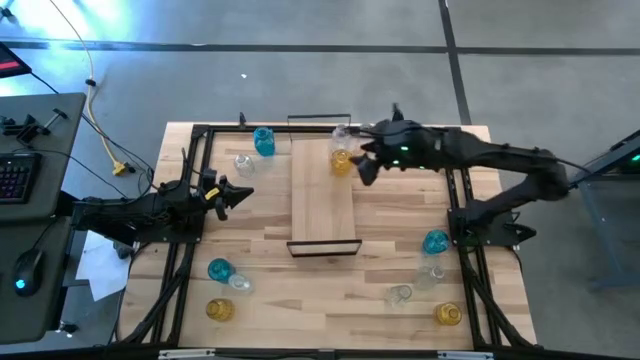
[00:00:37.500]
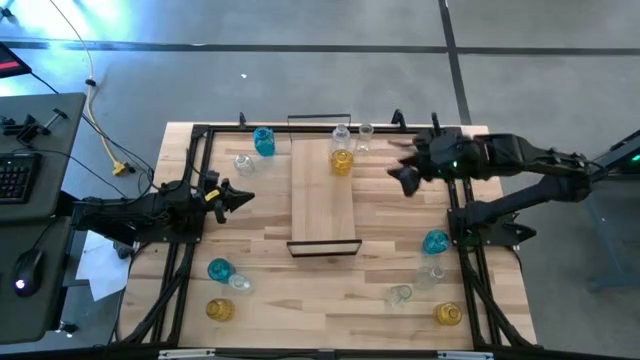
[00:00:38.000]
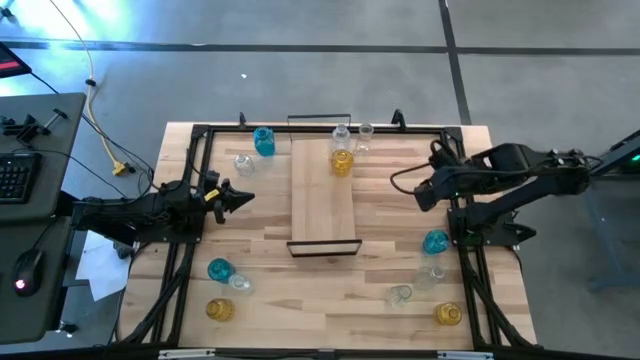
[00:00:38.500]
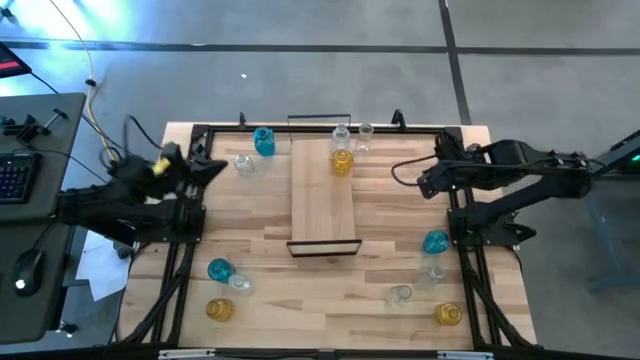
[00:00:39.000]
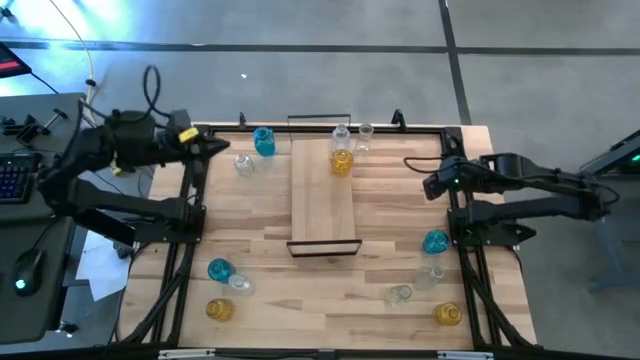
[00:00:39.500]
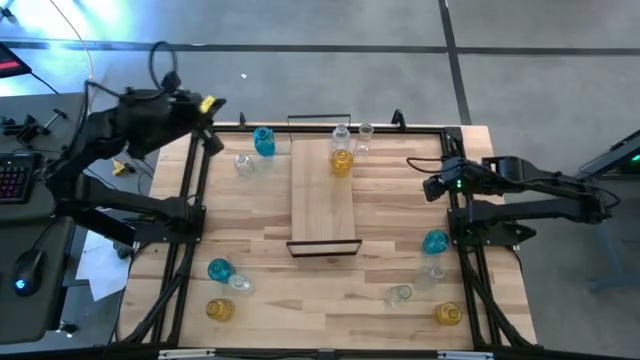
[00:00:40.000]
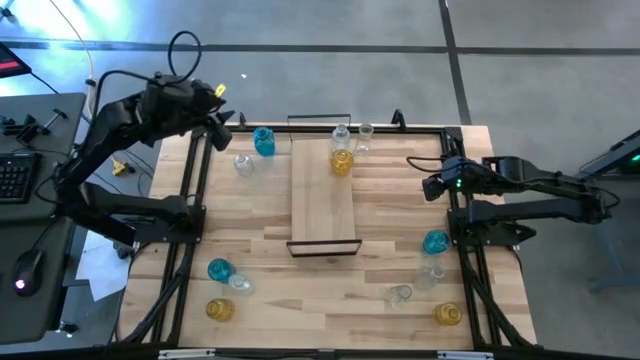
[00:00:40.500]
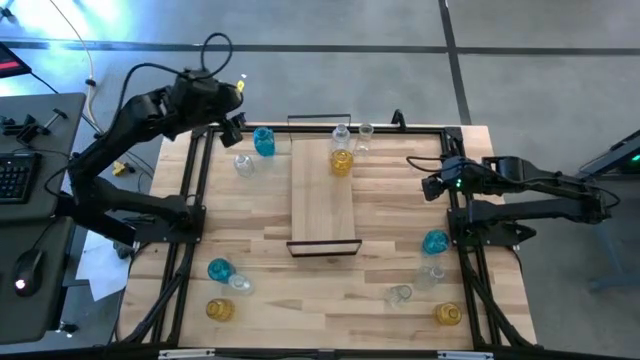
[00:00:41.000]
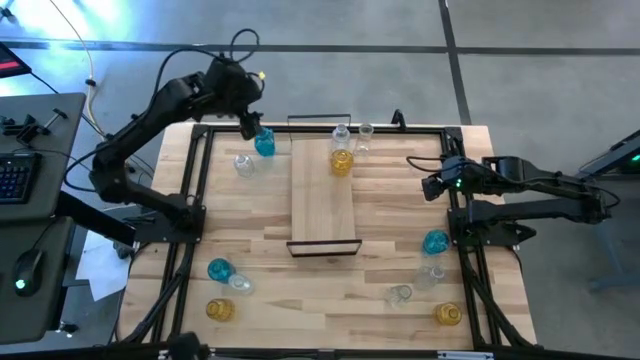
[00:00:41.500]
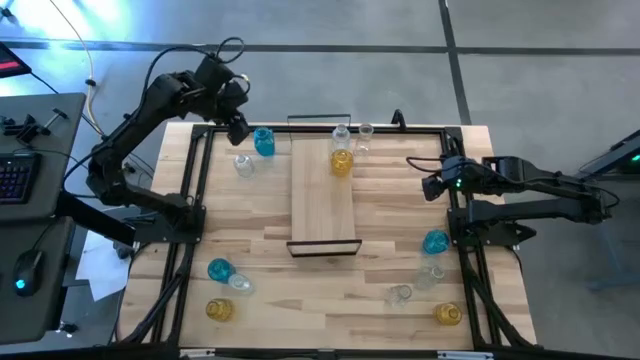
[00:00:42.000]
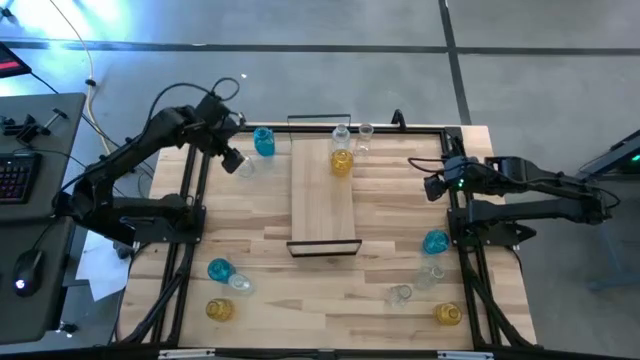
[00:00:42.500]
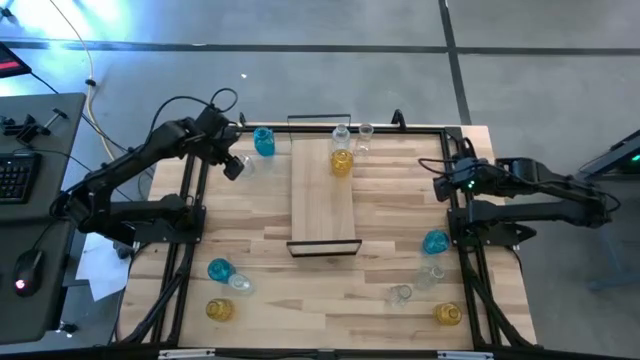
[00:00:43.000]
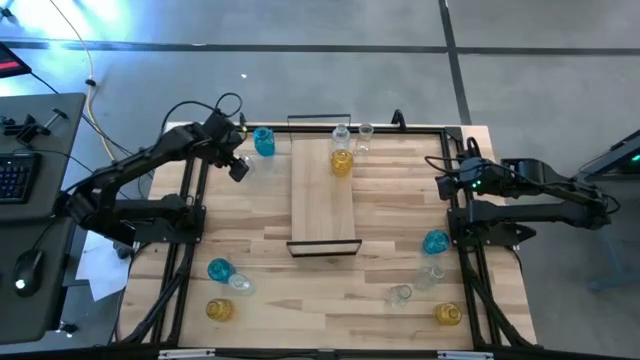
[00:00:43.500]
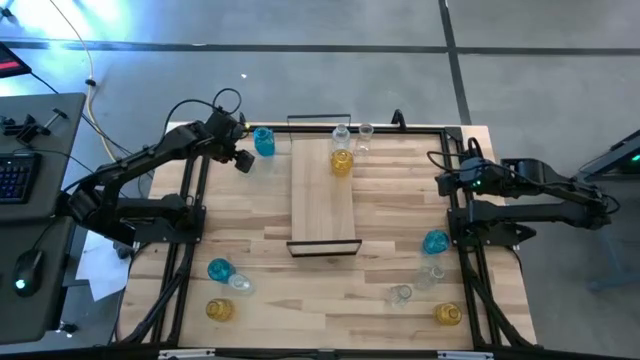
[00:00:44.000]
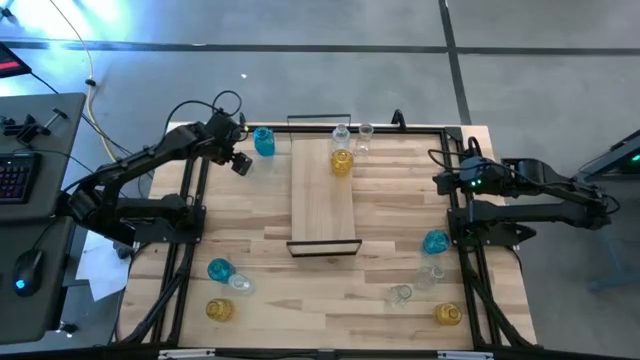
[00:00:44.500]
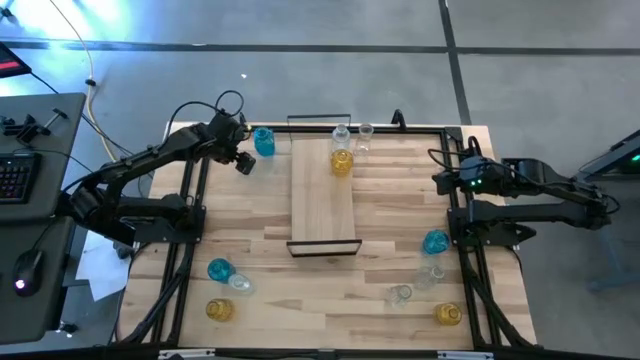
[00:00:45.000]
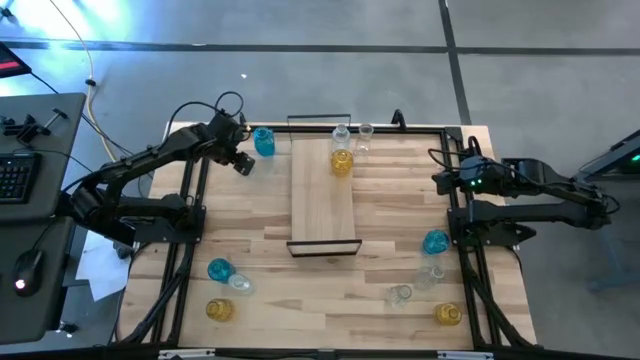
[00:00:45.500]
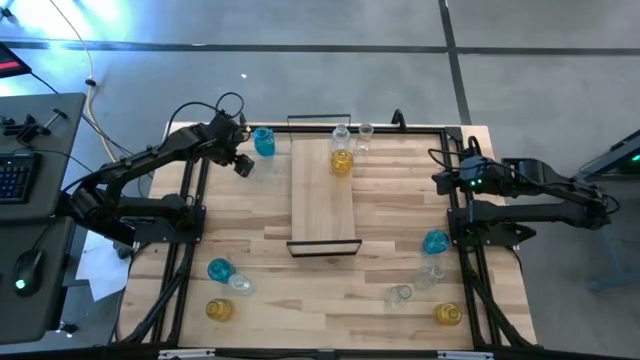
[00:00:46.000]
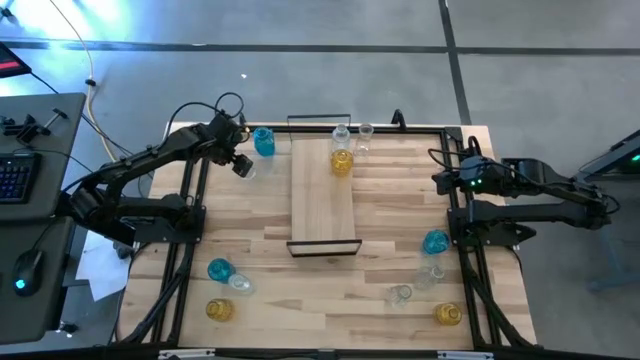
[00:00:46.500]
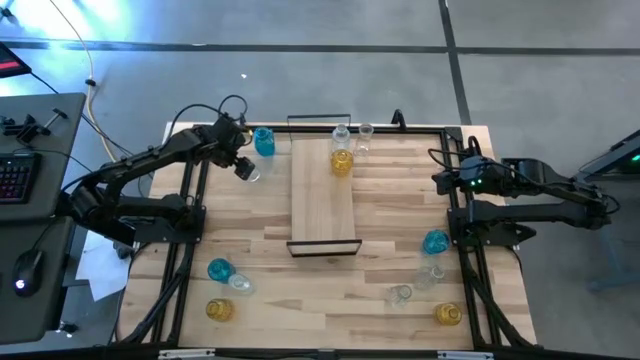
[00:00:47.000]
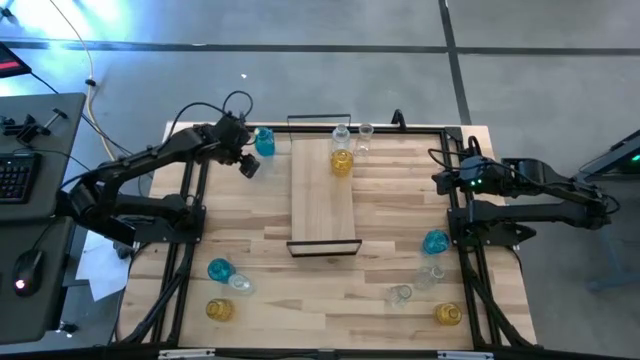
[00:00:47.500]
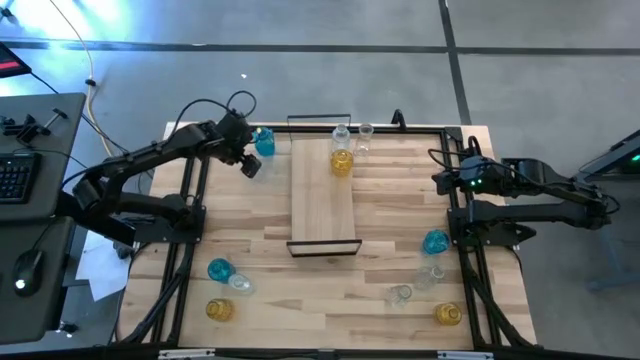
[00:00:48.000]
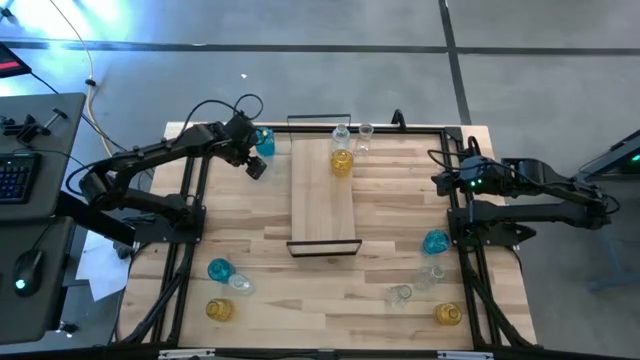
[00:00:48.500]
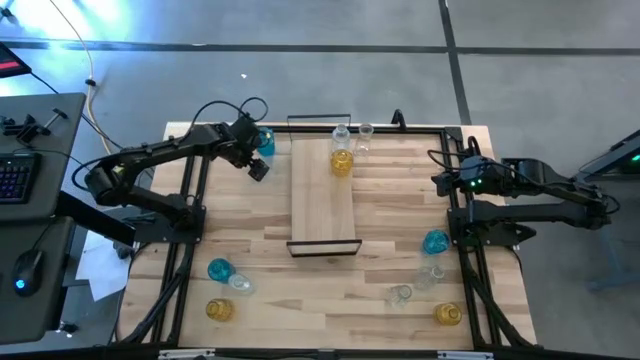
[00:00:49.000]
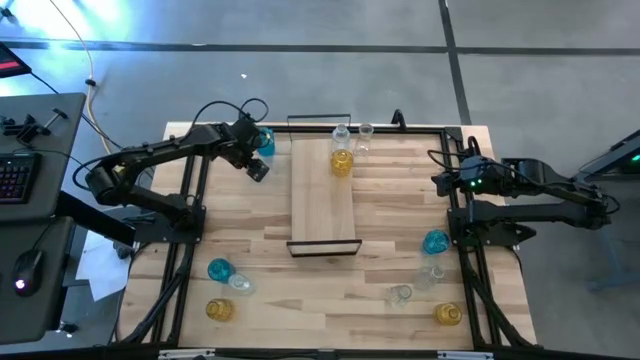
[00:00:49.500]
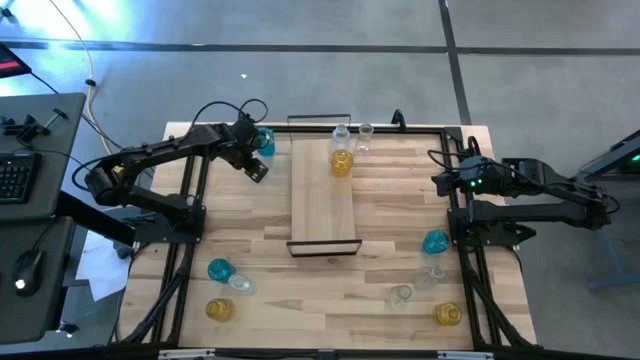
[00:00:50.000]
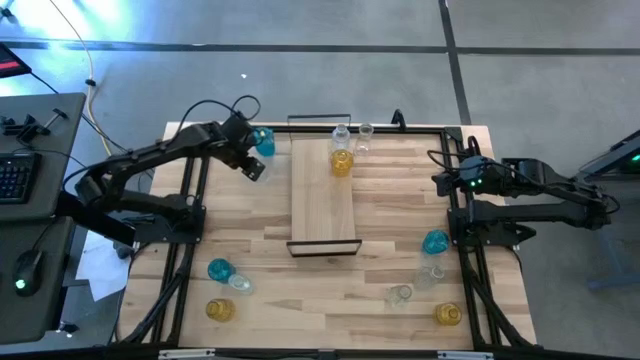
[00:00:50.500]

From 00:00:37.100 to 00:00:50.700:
Task: sort vases onto shelf
Put the top left transparent flower vase on the shelf aligned with the other transparent flower vase

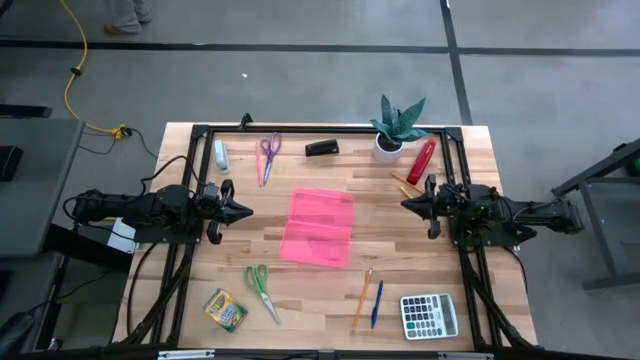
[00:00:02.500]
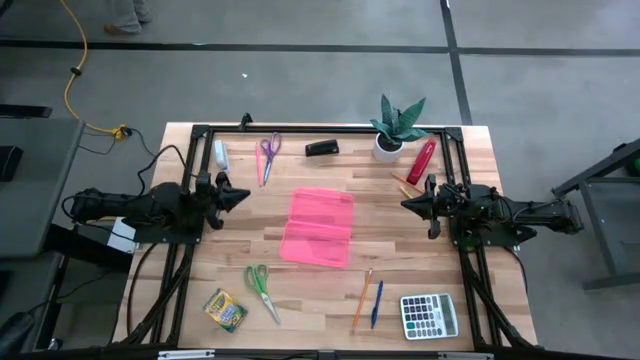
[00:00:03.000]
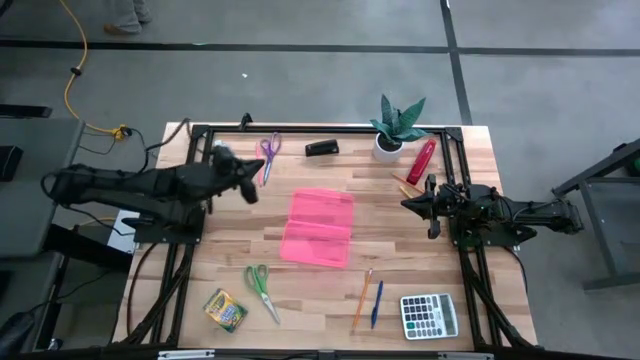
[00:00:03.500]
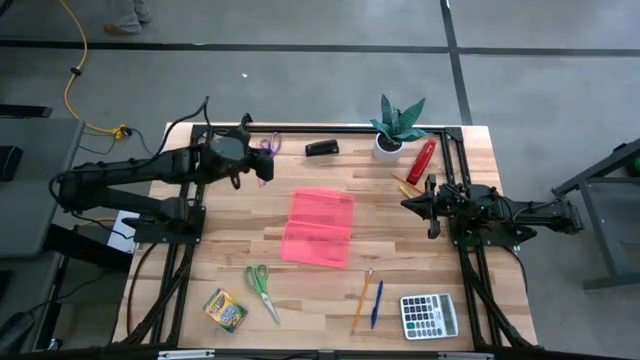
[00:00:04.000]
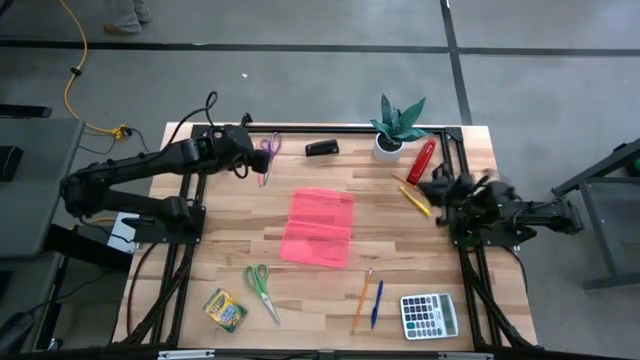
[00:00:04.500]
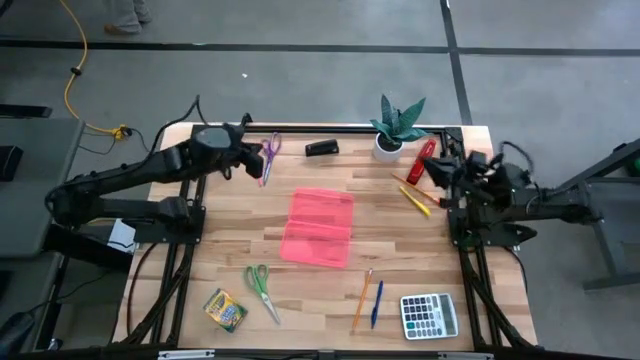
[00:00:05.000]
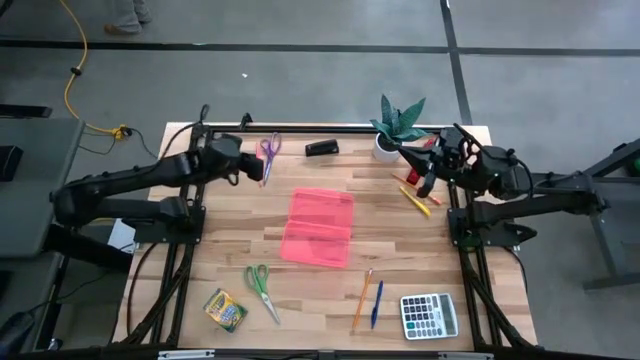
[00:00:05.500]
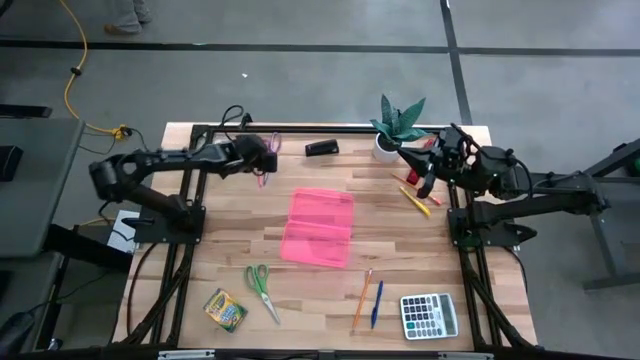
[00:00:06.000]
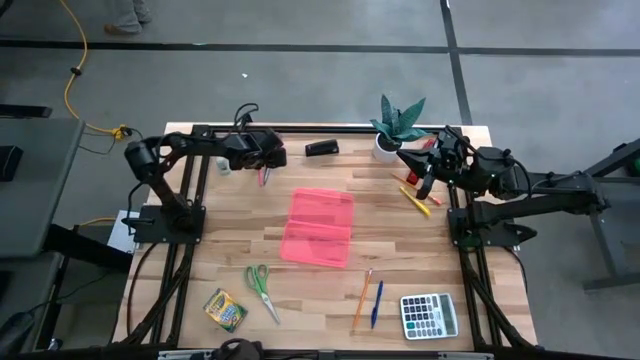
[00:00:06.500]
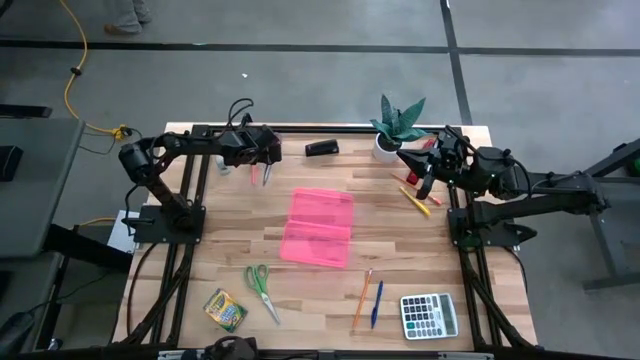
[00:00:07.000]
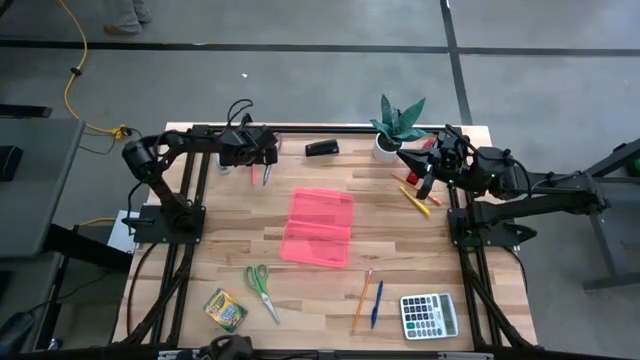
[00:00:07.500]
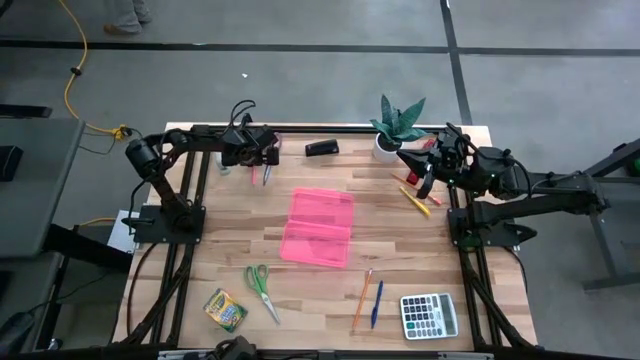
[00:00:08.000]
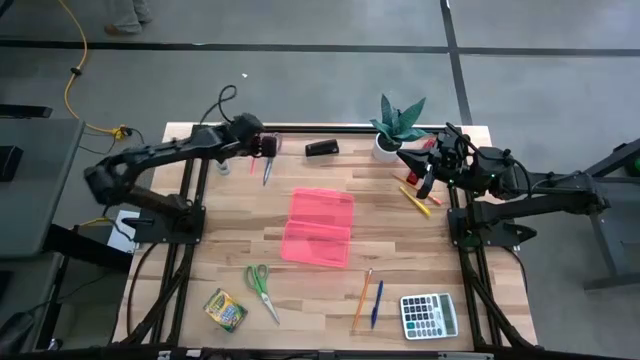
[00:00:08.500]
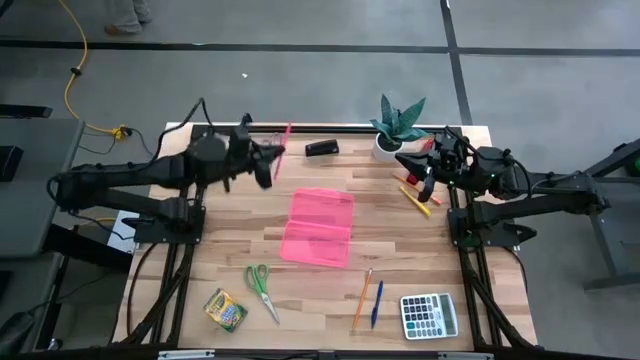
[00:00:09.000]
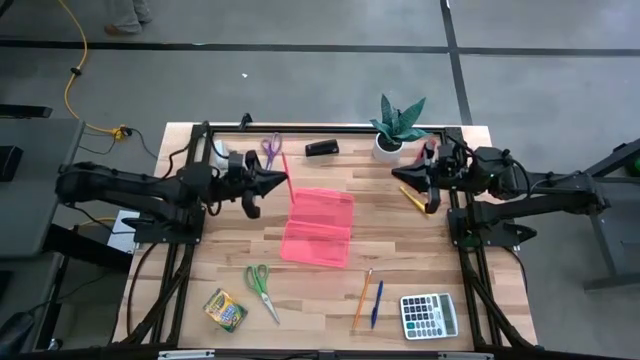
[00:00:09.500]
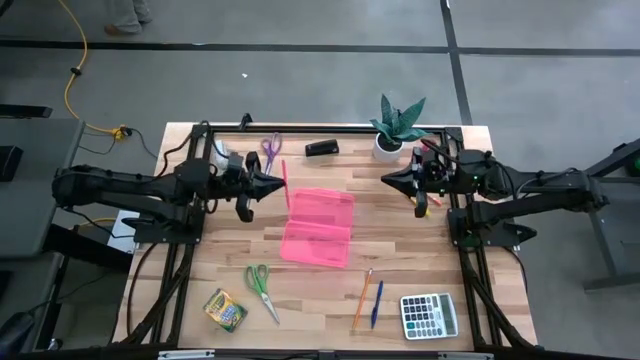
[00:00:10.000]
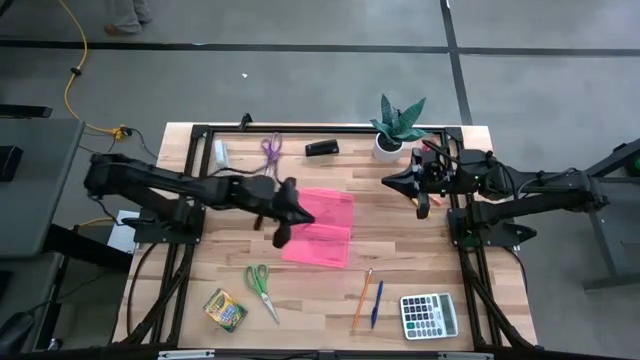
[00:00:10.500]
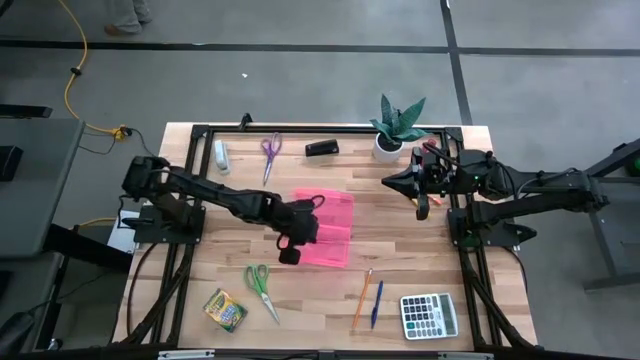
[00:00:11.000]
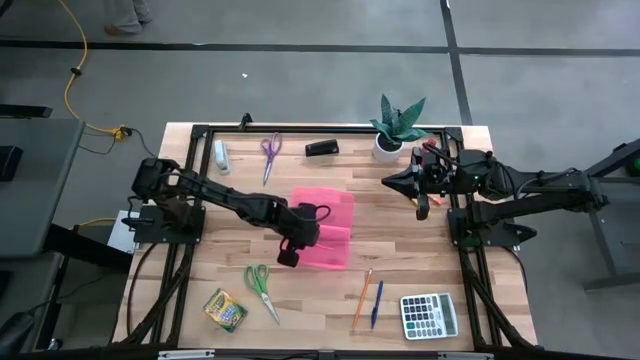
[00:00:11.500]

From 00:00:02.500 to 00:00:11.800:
Task: Pick & place school supplies into a supply box
Put the pink pencil into the pink supply box
